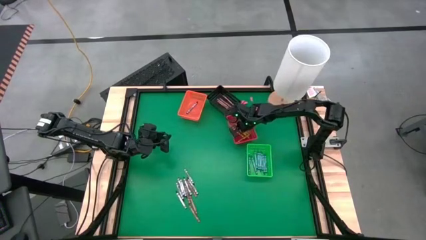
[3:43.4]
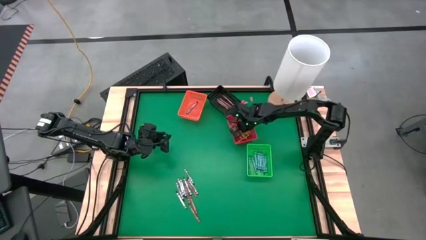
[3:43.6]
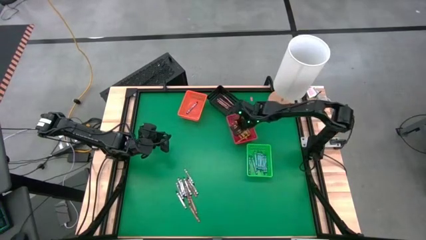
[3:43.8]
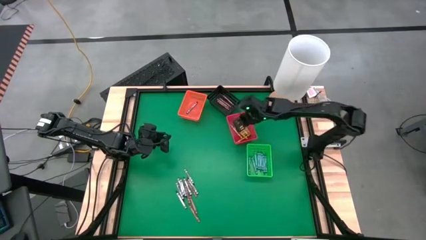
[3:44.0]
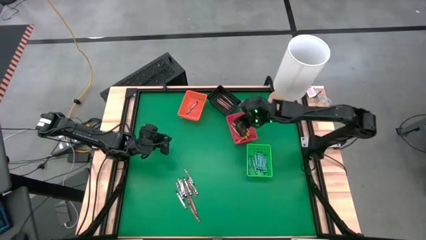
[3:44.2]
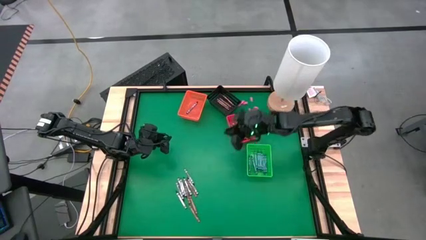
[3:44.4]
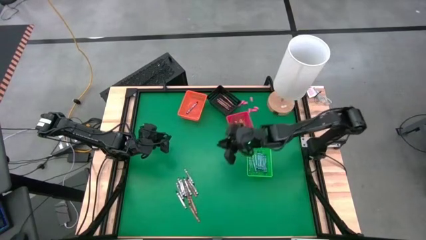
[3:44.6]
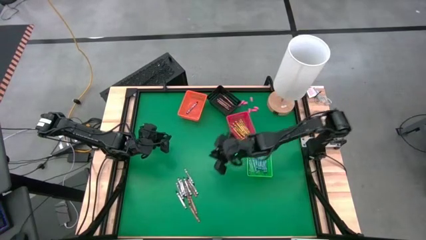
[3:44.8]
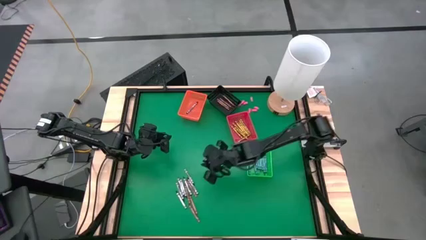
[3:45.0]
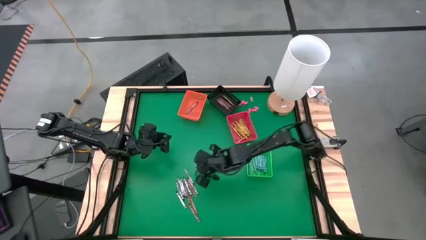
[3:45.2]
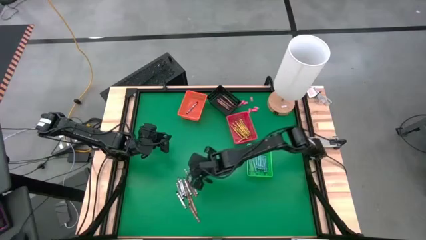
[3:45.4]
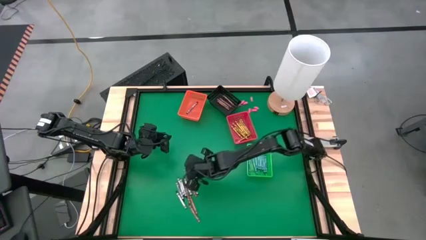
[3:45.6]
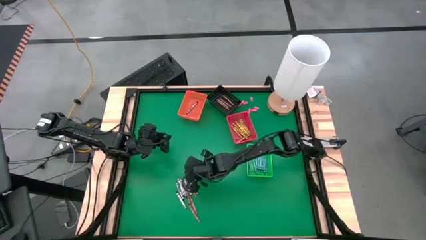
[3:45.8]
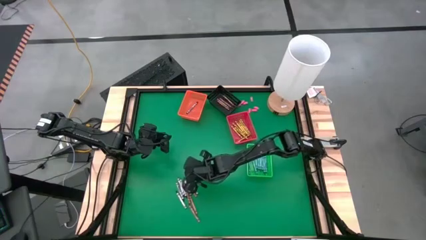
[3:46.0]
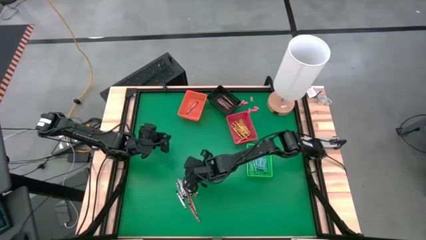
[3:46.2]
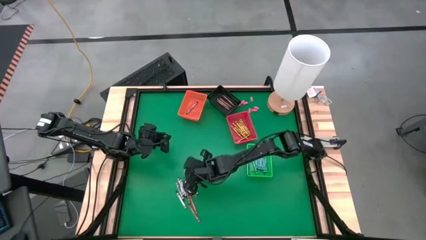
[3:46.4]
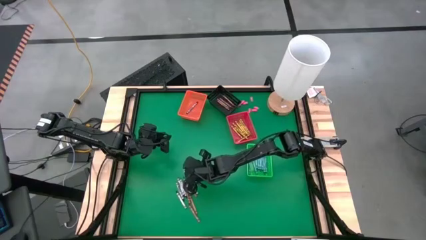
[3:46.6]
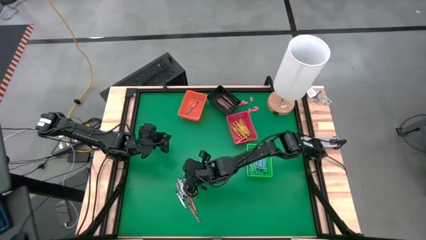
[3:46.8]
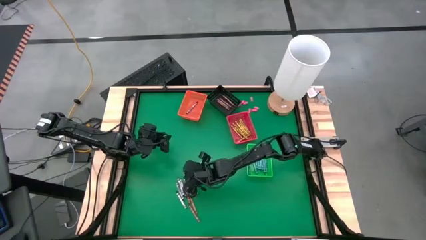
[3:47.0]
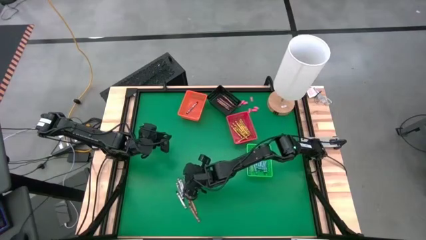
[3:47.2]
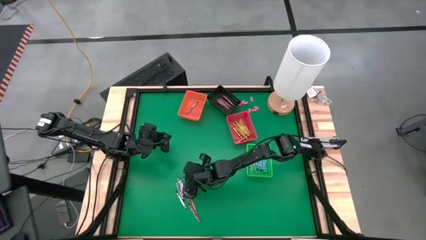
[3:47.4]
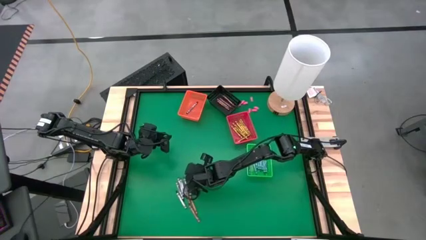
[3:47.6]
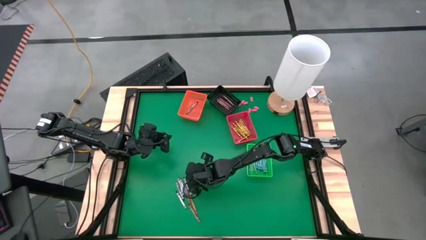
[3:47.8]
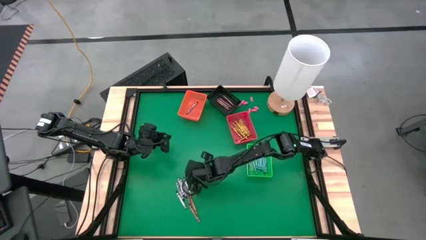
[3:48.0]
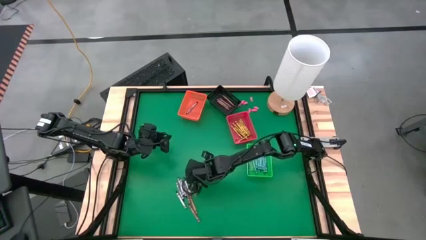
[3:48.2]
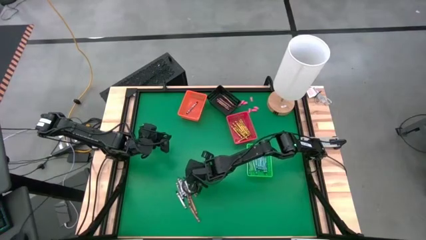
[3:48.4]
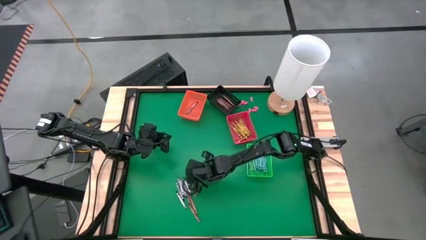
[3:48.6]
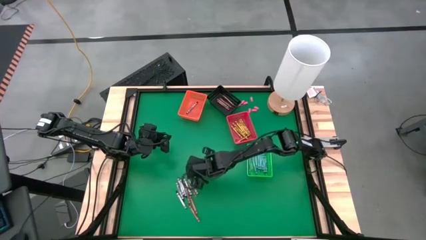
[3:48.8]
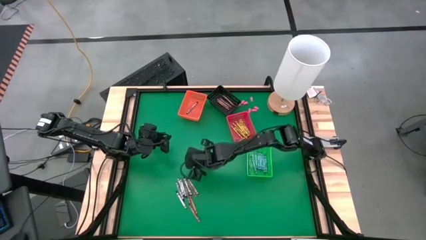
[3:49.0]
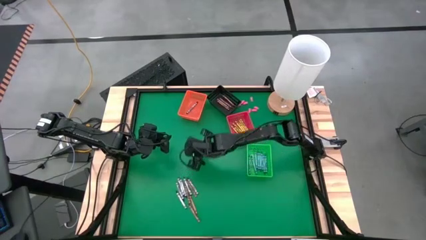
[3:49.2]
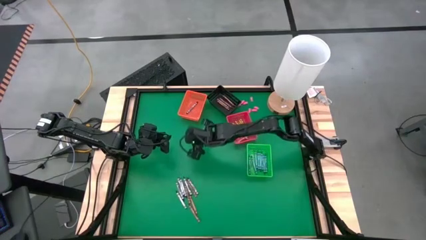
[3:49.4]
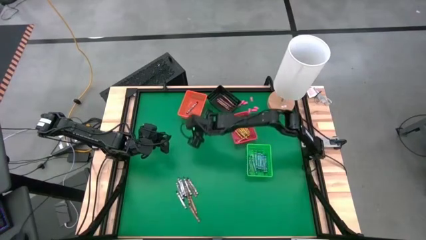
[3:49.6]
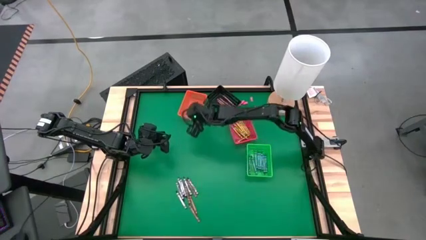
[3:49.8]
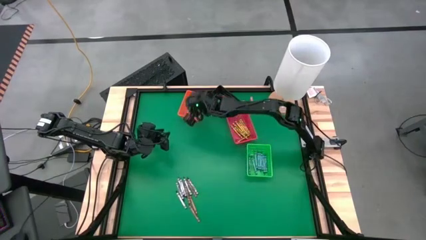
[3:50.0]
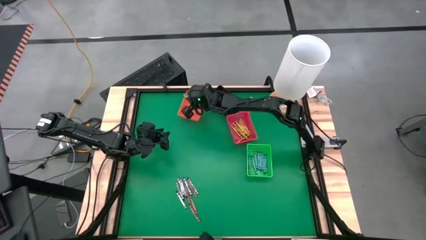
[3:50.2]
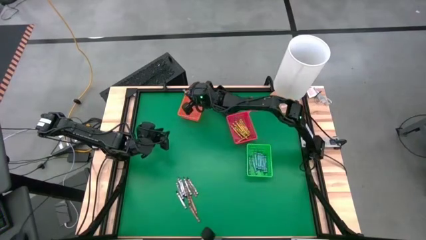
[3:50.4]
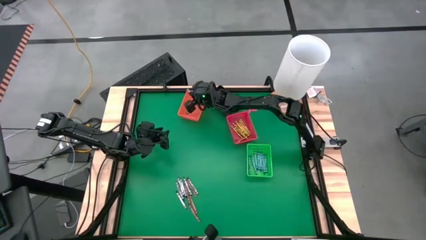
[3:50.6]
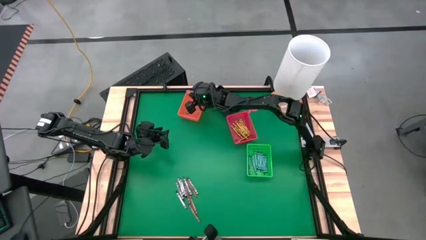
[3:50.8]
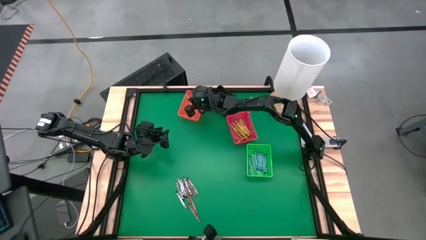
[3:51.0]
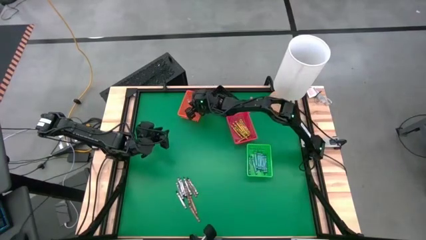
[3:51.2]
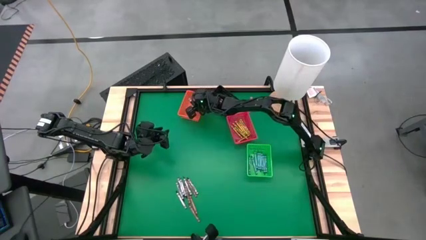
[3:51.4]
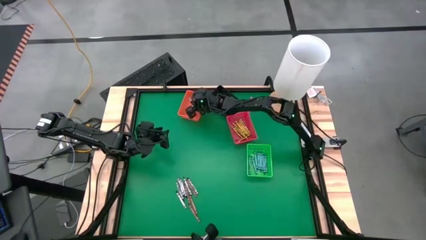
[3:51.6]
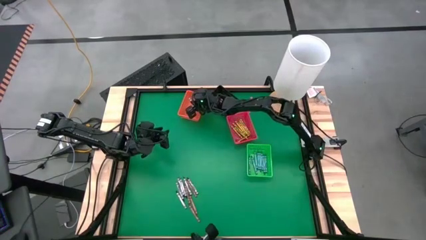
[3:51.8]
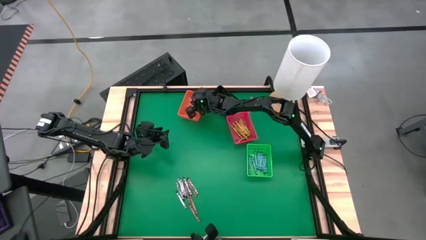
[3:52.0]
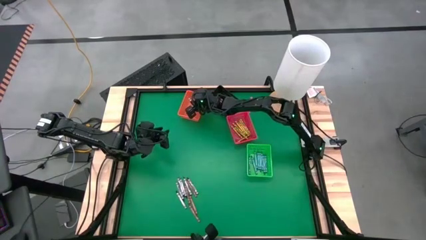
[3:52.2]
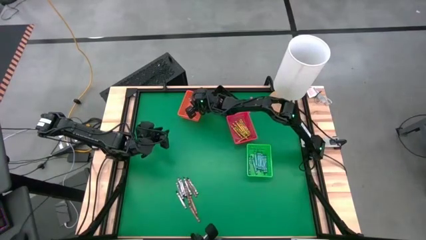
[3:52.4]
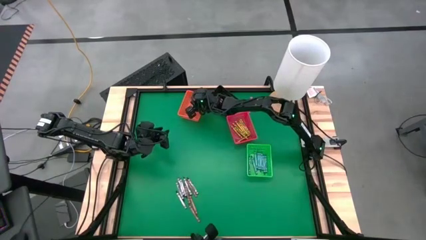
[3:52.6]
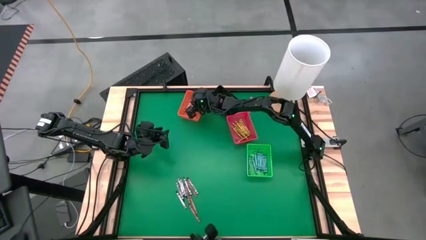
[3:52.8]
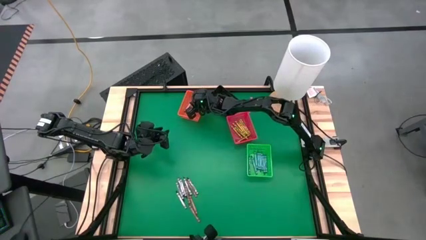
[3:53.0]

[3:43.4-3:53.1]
Task: Sort crayons
Put the black crayon into the orange bin

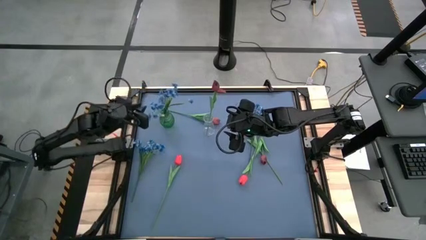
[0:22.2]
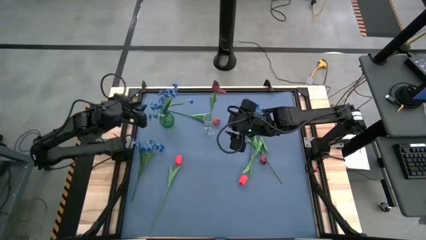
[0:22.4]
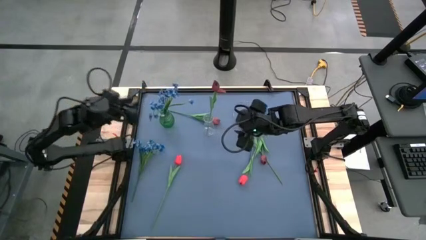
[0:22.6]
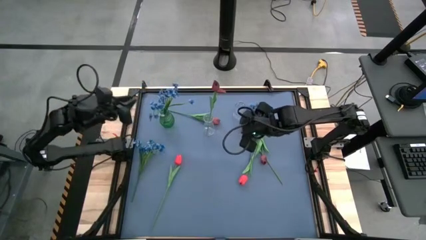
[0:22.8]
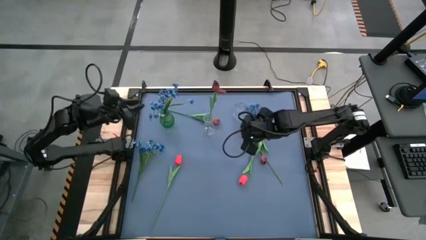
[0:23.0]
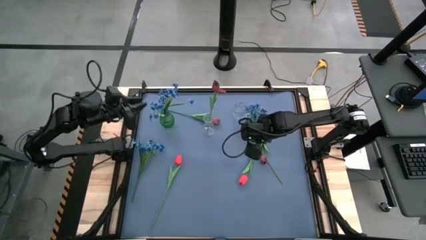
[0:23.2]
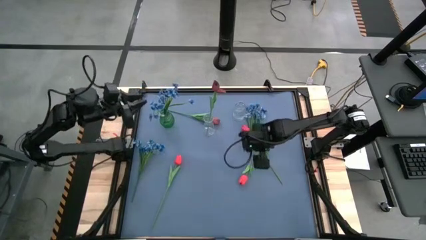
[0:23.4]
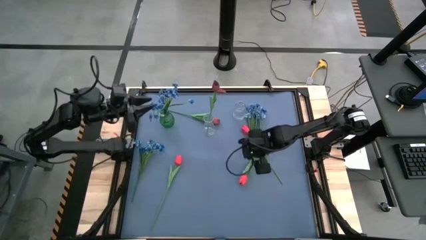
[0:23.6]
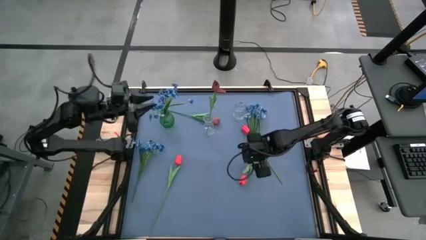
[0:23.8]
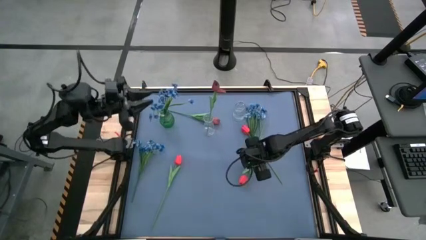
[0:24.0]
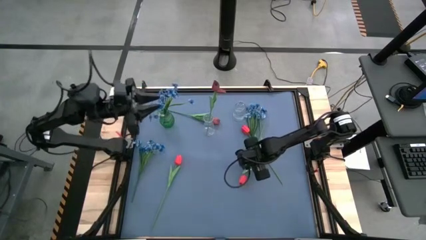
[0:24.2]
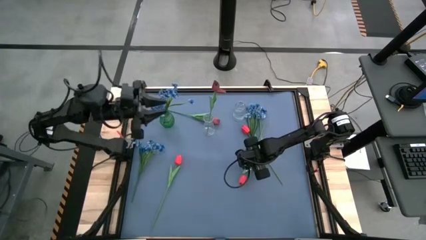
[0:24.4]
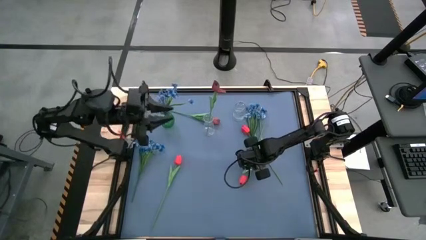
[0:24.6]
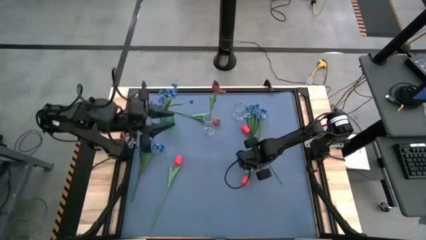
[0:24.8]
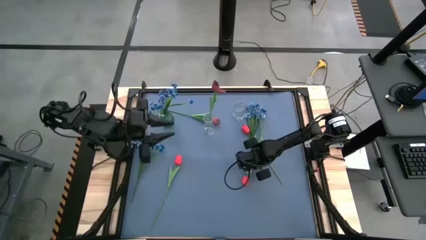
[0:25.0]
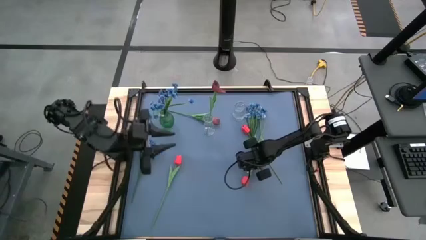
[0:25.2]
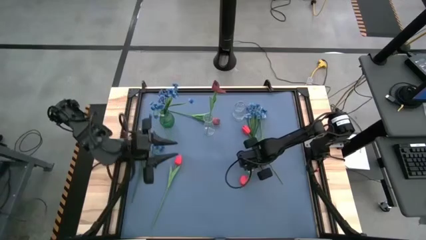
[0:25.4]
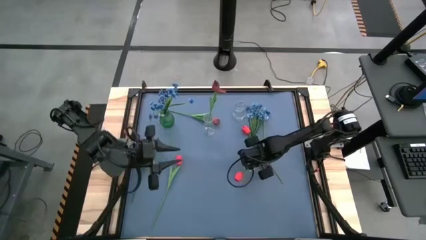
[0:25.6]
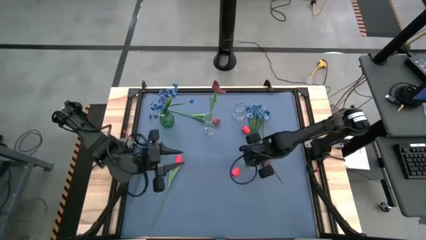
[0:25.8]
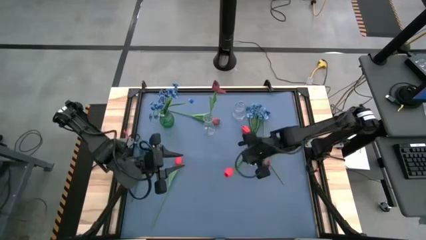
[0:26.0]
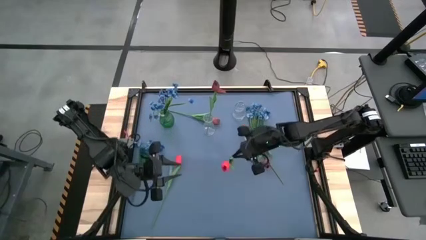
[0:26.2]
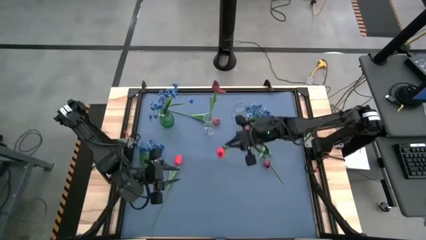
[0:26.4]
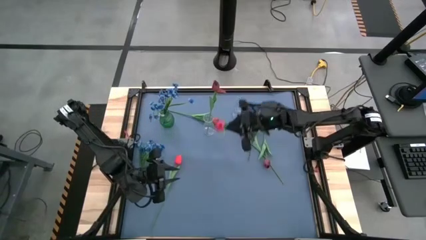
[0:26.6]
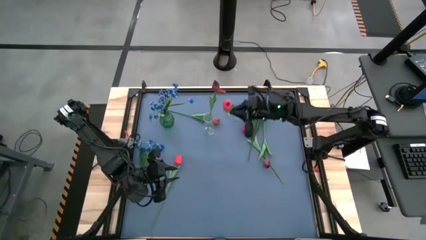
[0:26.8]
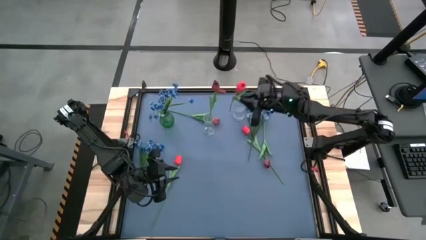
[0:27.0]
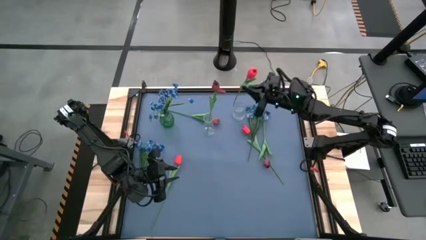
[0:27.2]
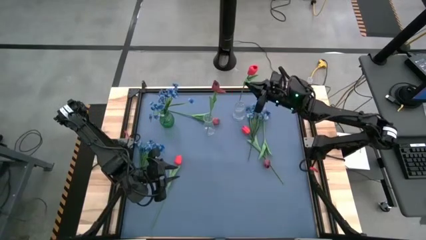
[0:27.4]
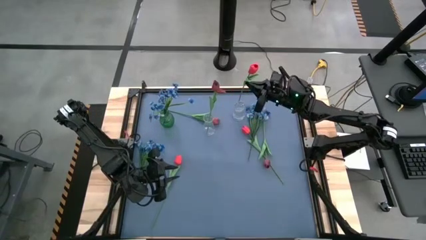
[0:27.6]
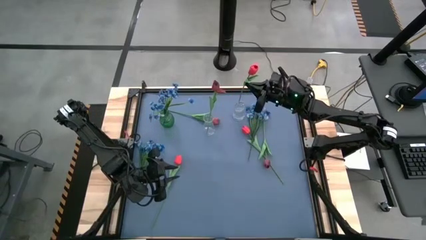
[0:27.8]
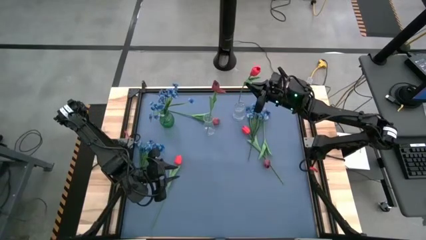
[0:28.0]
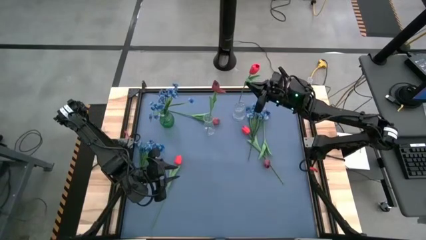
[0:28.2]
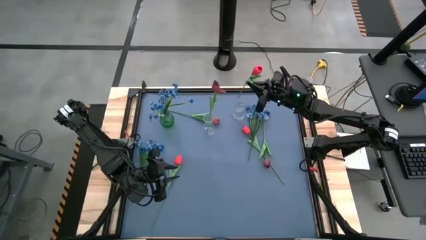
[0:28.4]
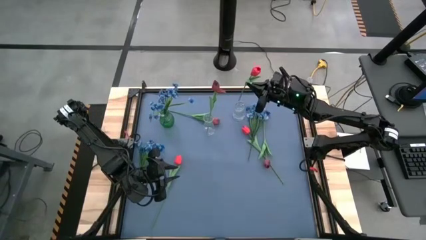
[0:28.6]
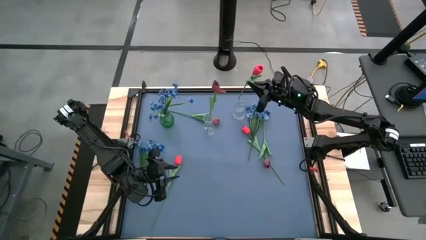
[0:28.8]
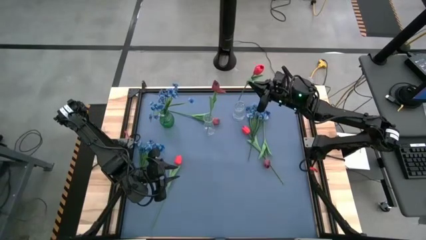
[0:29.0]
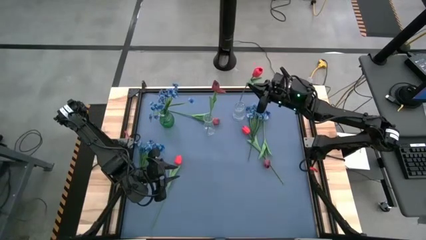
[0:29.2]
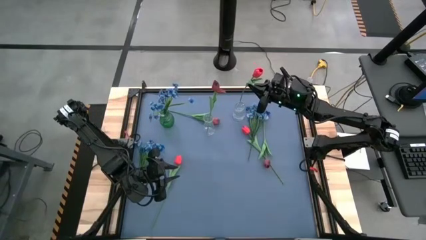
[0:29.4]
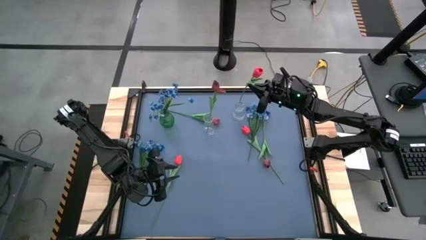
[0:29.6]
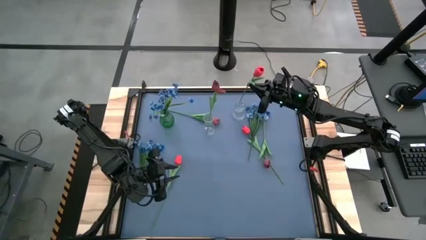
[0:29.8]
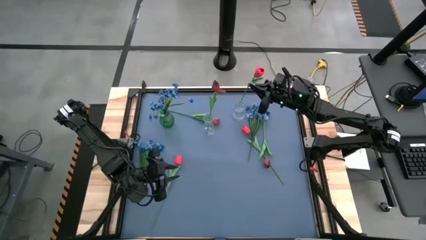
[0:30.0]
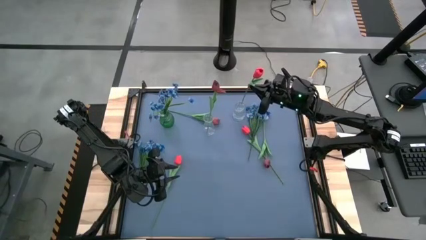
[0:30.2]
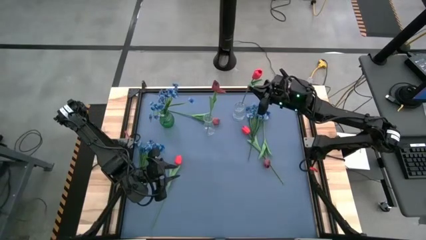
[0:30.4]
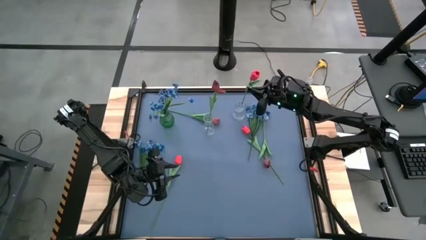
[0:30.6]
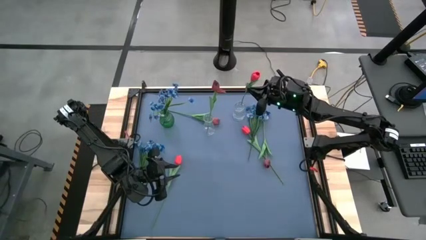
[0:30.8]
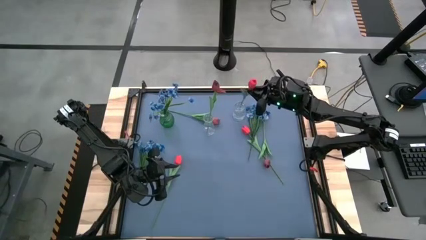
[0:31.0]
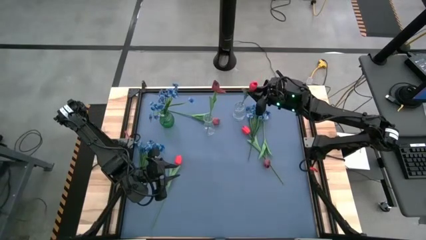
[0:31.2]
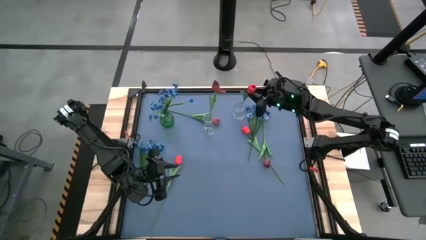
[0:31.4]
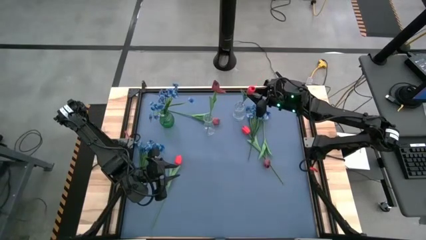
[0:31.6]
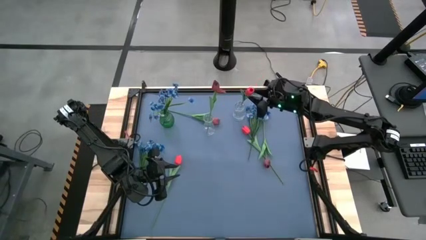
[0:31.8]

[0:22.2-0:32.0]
Task: Sort flowers into vase by color
Put the right red tulip into the top transparent vase
